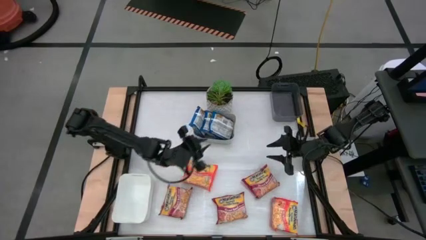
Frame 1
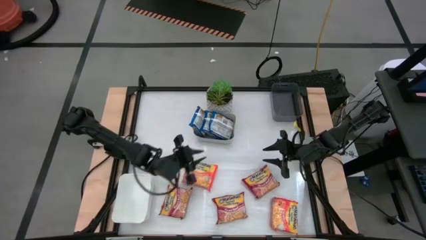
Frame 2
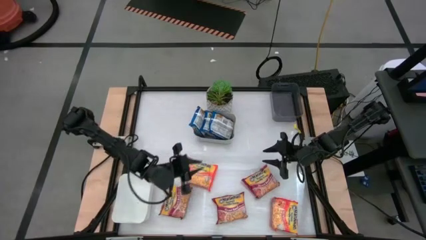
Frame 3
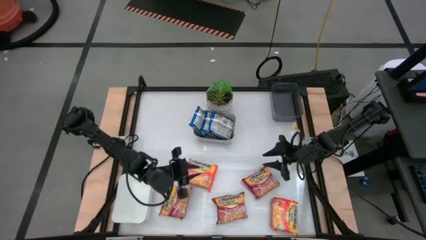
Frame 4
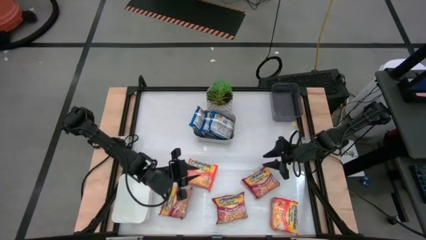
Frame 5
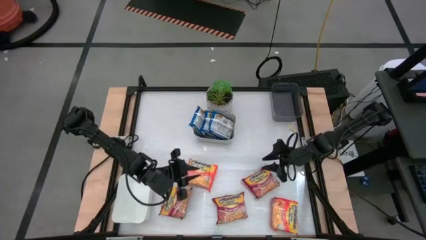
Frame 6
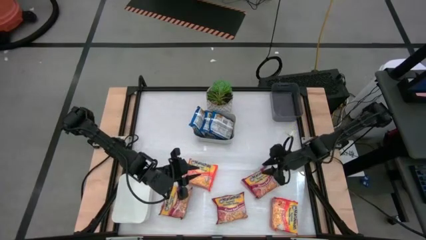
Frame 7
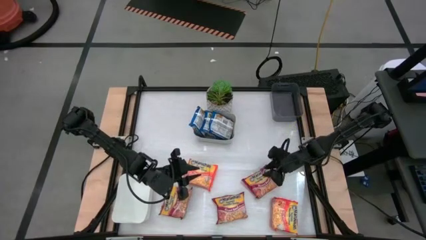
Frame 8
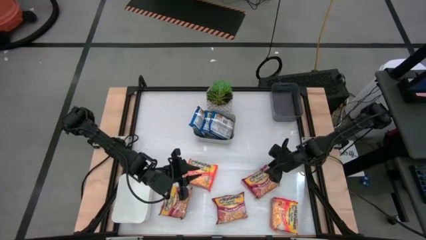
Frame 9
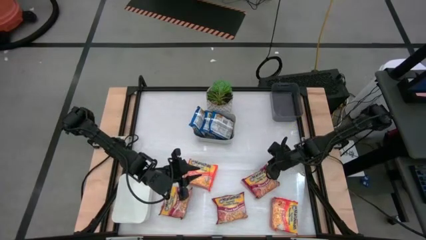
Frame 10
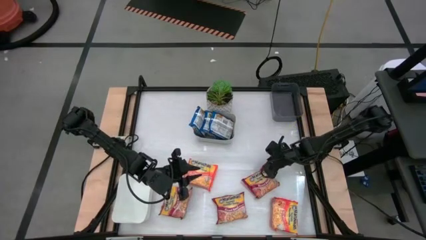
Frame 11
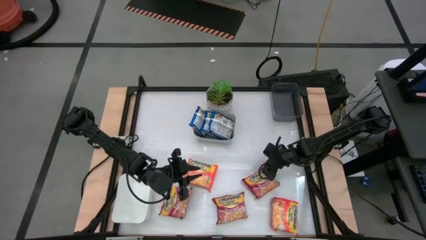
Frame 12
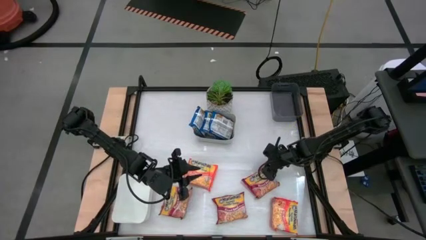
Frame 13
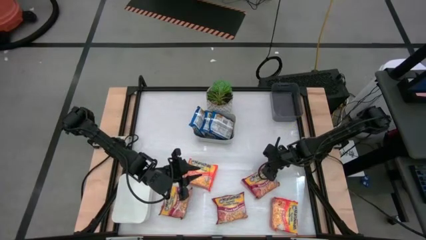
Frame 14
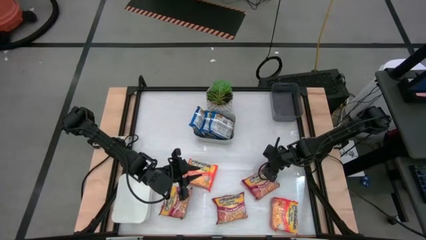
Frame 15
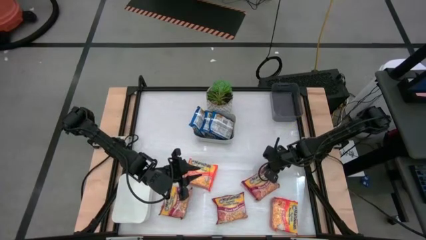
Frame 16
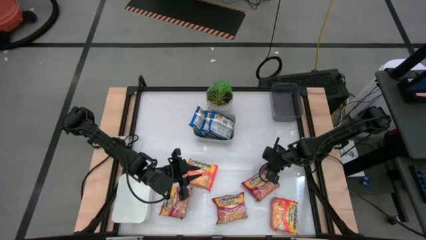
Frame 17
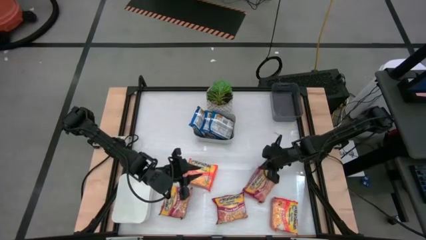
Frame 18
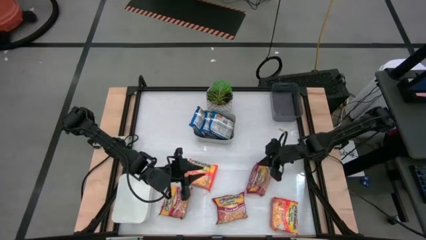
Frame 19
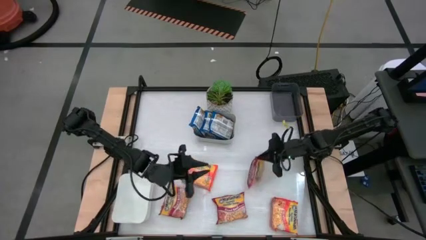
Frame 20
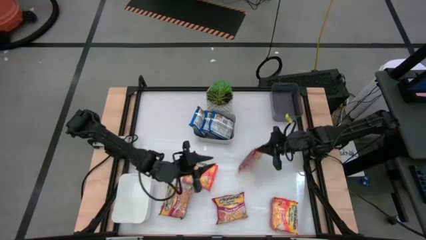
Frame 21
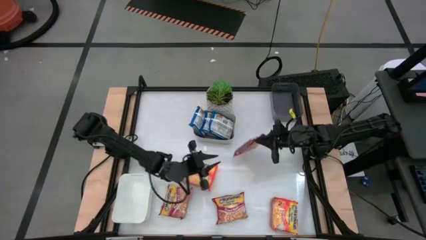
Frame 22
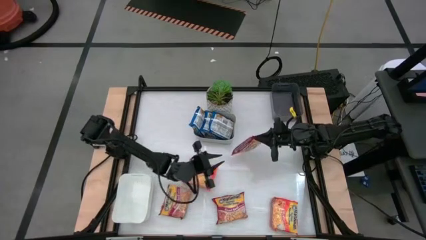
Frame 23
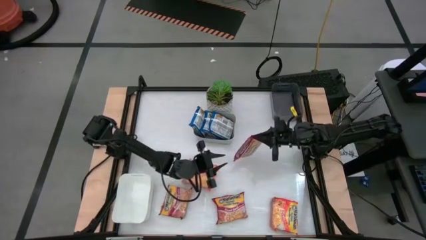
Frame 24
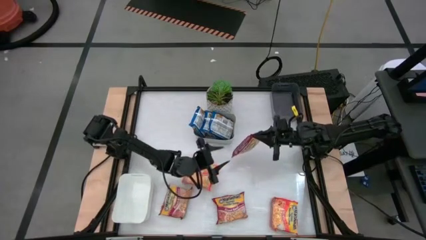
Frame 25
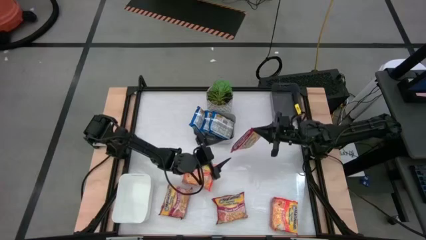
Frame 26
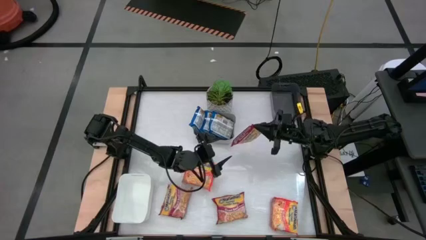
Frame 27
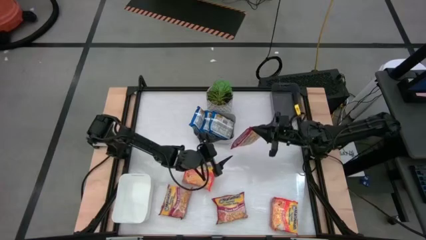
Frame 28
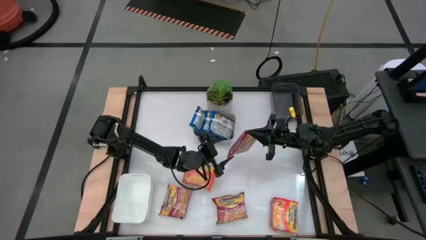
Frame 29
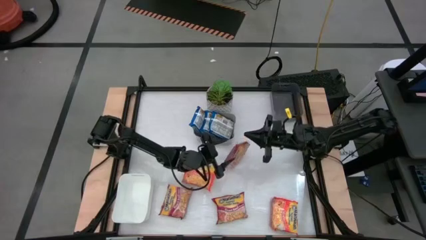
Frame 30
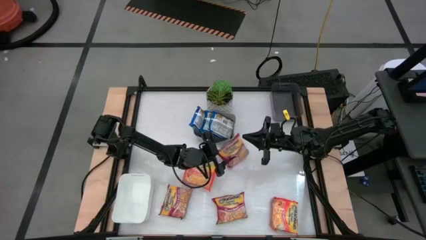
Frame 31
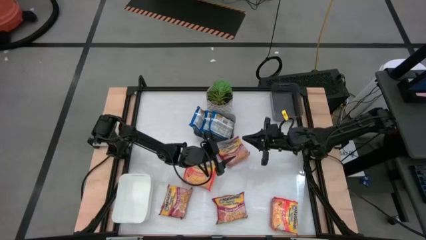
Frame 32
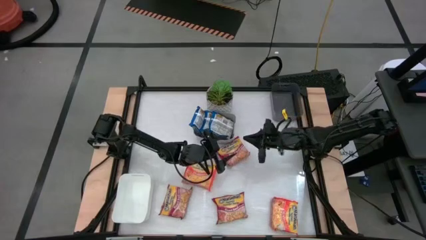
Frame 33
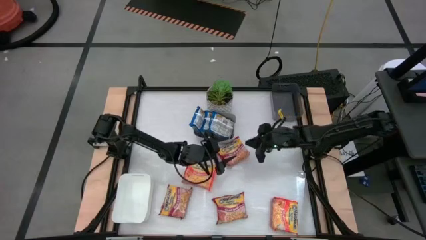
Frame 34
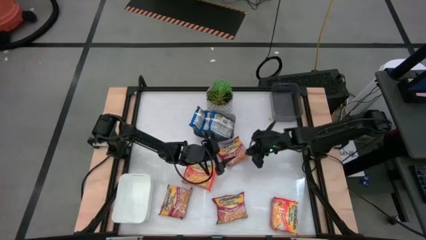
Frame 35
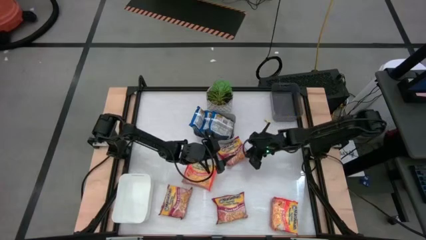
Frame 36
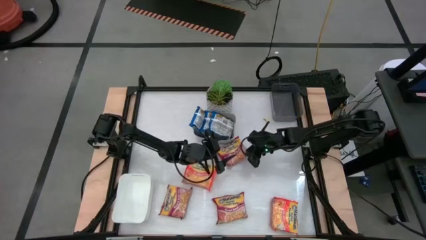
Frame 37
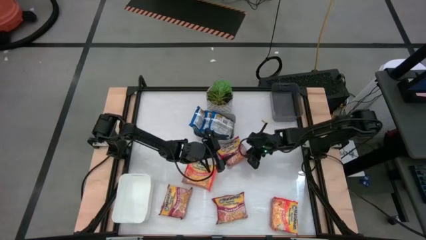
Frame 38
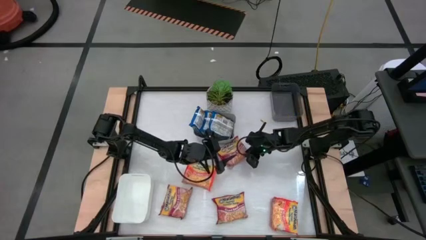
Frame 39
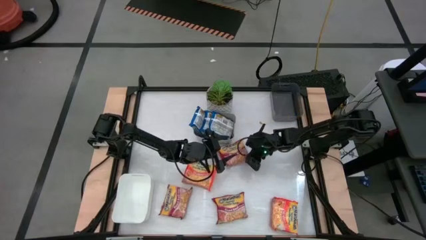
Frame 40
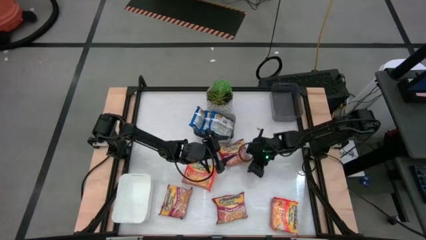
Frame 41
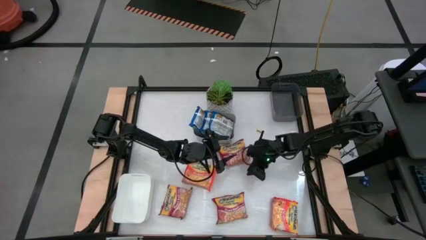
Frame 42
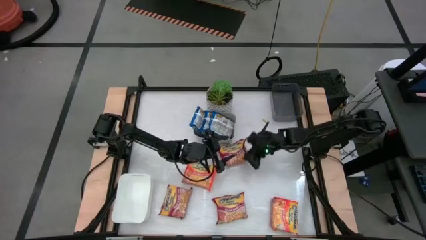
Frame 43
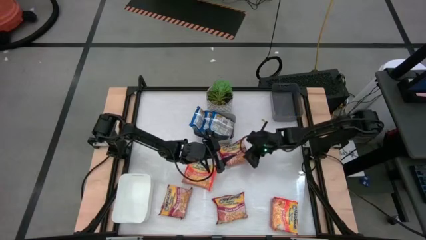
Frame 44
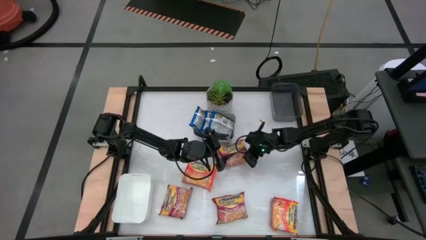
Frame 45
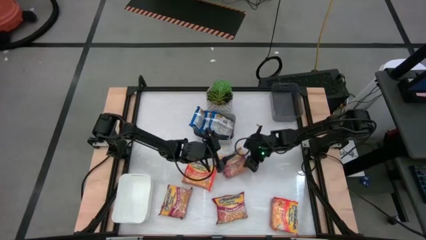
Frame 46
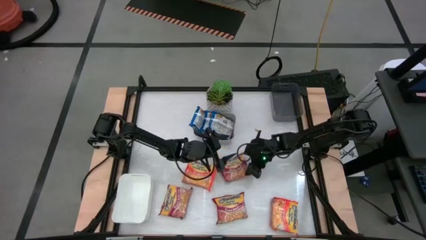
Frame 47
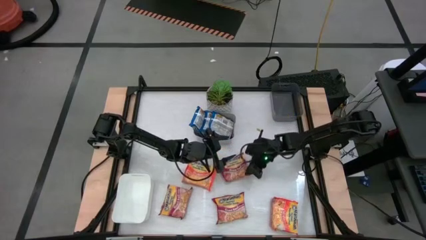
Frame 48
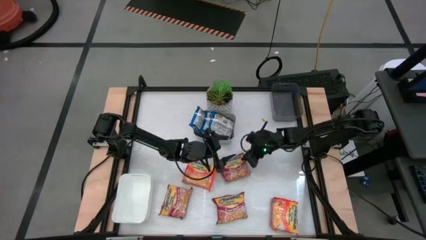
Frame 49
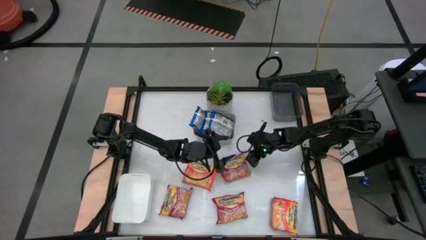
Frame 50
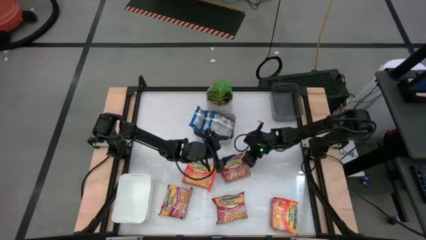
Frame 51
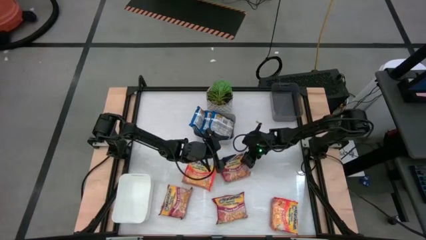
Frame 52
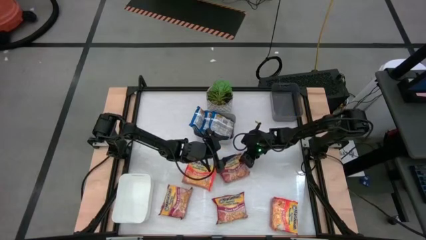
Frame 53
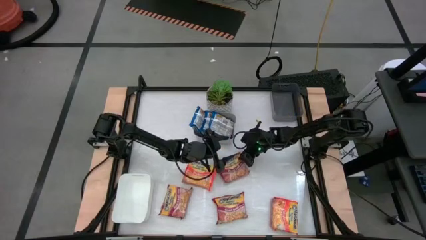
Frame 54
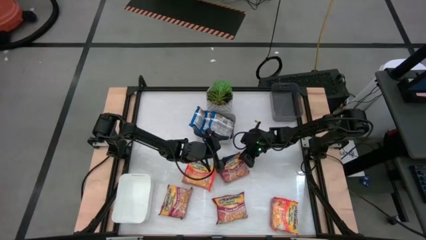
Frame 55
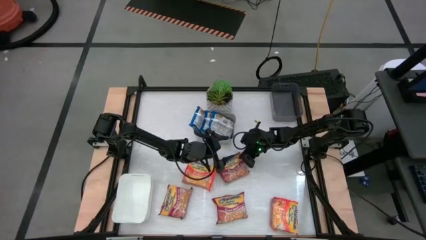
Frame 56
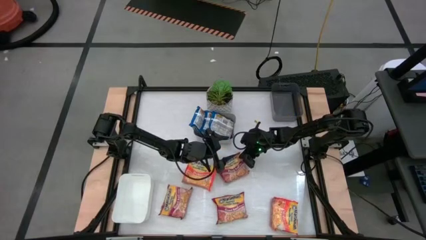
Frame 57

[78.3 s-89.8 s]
Task: Sort Maruchan noodles
Put the right red noodle pack into the black bin
